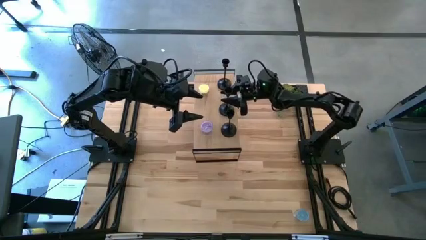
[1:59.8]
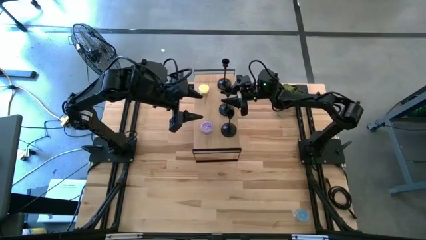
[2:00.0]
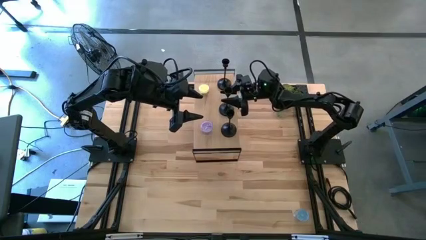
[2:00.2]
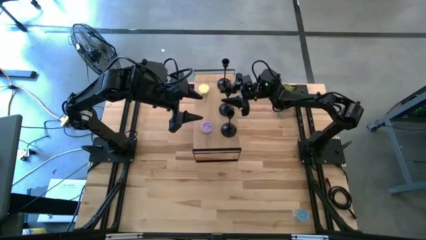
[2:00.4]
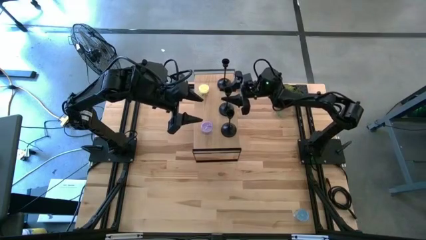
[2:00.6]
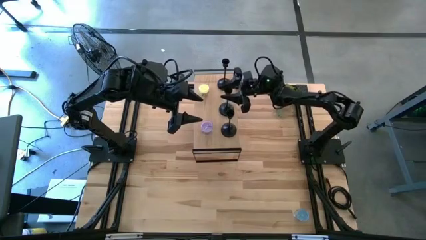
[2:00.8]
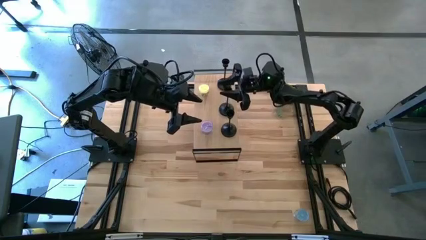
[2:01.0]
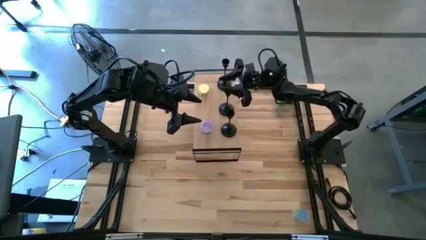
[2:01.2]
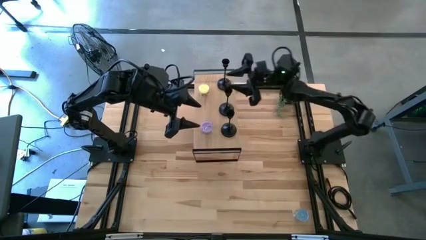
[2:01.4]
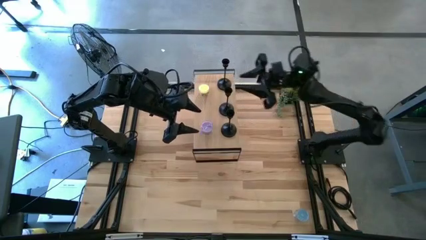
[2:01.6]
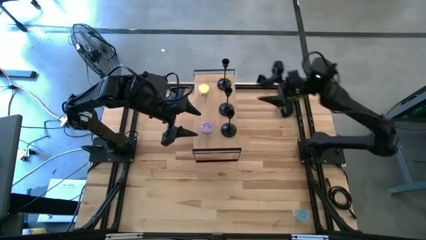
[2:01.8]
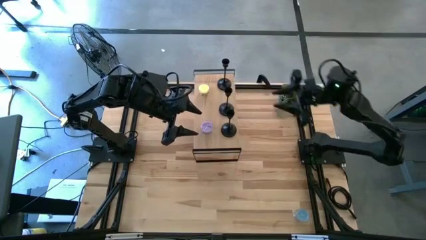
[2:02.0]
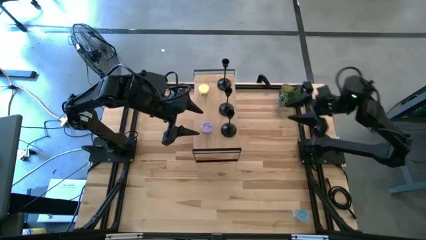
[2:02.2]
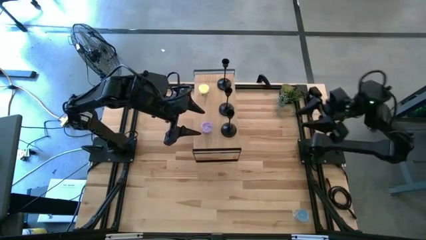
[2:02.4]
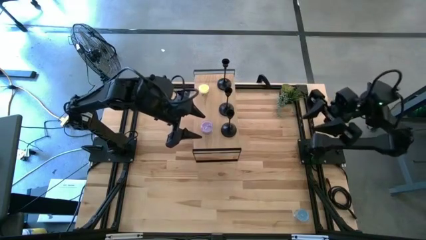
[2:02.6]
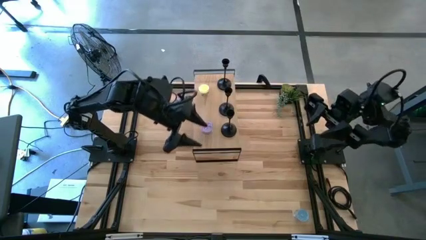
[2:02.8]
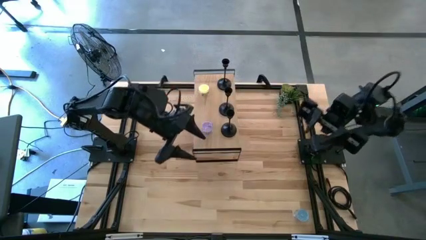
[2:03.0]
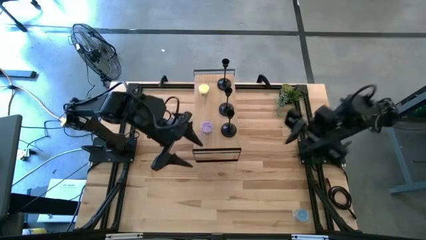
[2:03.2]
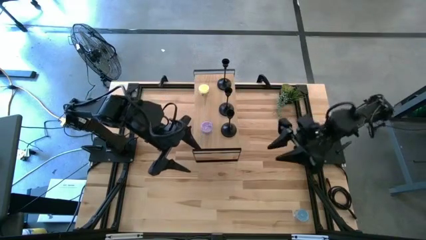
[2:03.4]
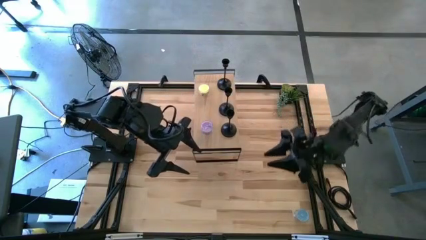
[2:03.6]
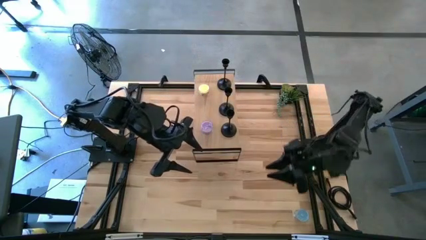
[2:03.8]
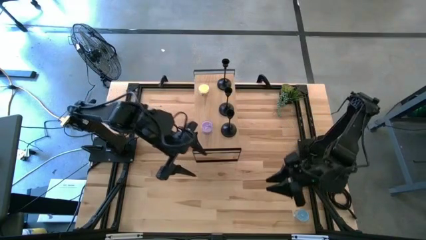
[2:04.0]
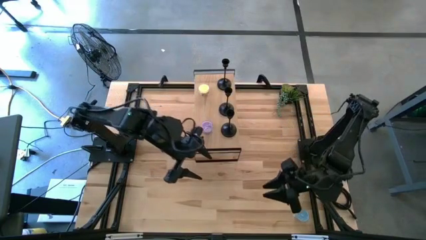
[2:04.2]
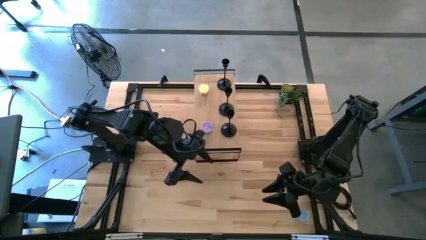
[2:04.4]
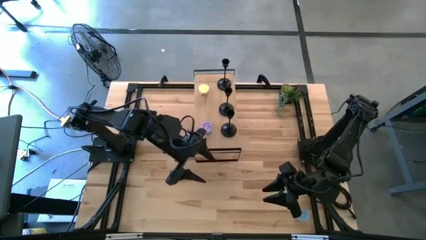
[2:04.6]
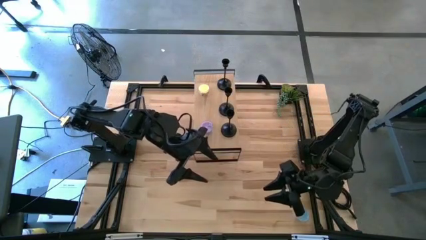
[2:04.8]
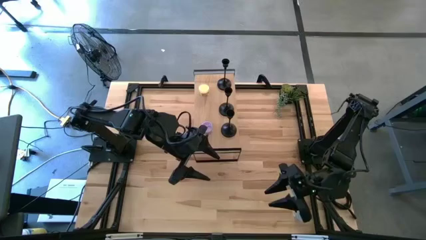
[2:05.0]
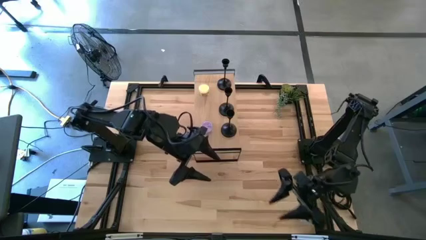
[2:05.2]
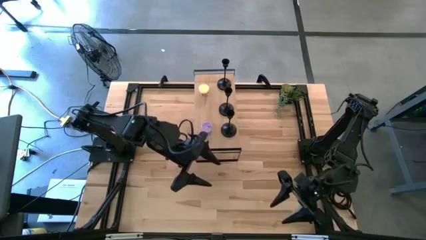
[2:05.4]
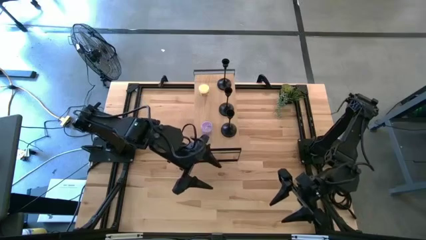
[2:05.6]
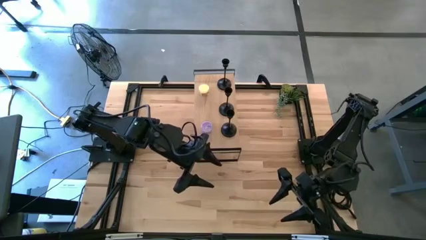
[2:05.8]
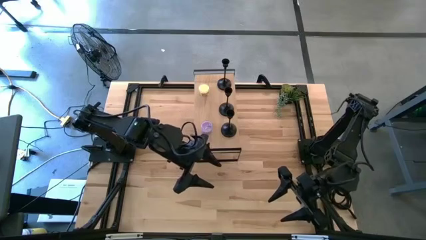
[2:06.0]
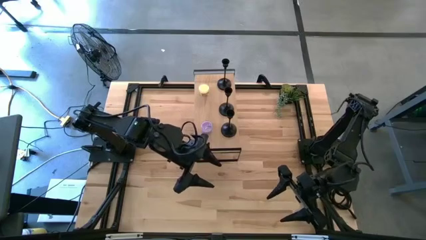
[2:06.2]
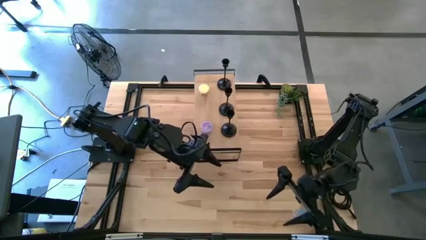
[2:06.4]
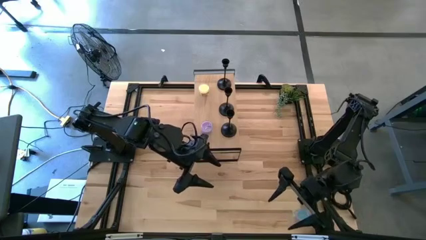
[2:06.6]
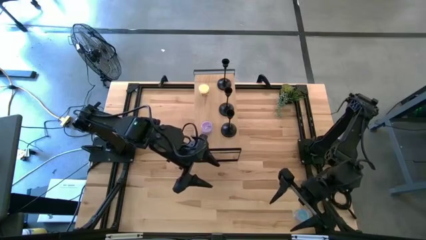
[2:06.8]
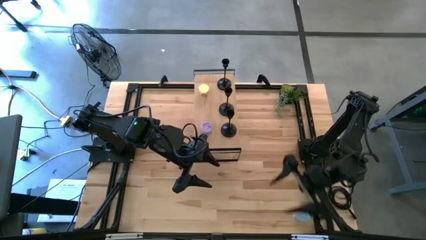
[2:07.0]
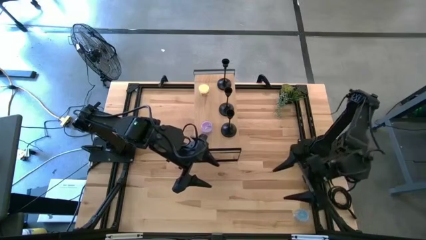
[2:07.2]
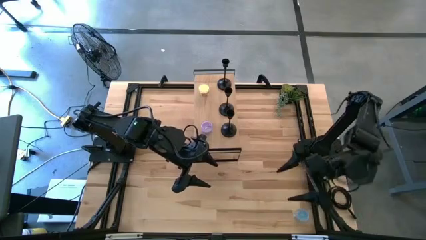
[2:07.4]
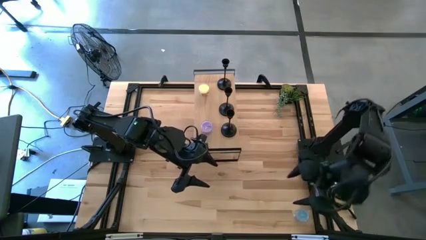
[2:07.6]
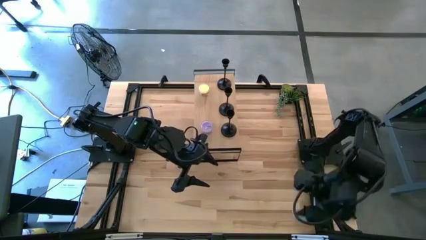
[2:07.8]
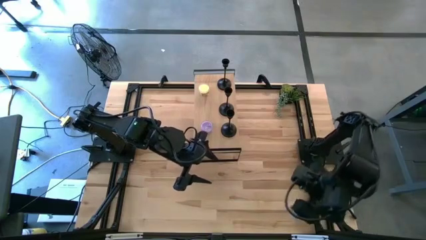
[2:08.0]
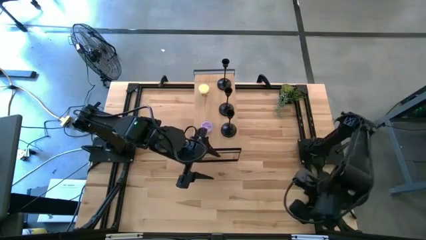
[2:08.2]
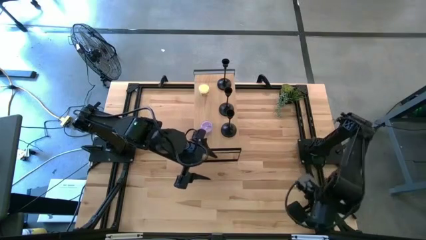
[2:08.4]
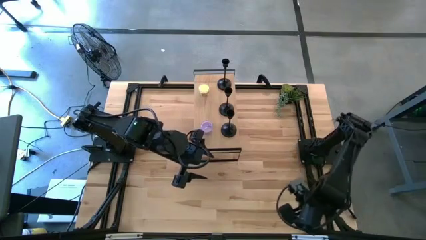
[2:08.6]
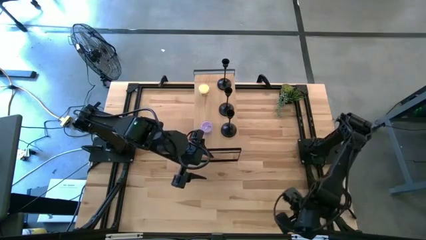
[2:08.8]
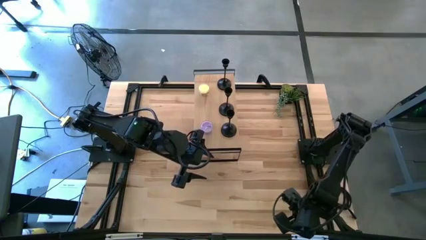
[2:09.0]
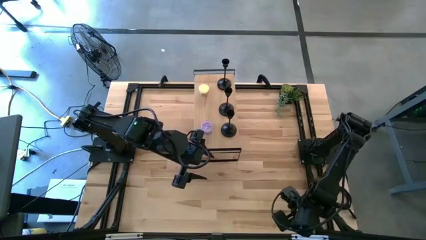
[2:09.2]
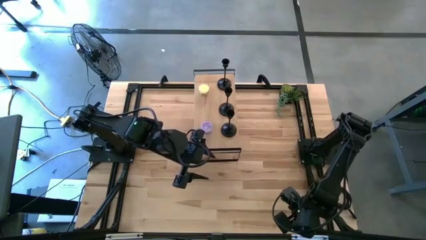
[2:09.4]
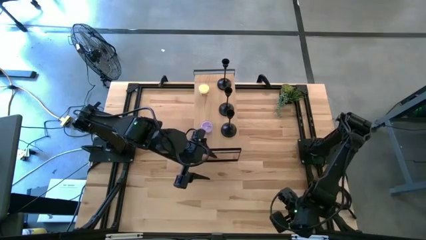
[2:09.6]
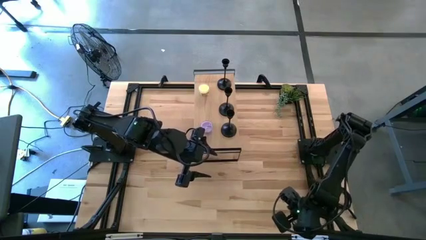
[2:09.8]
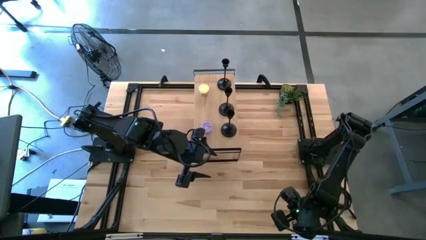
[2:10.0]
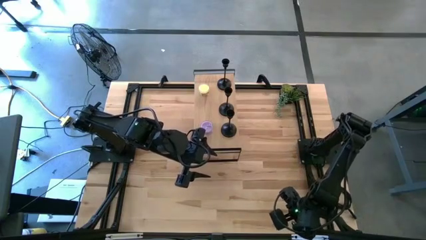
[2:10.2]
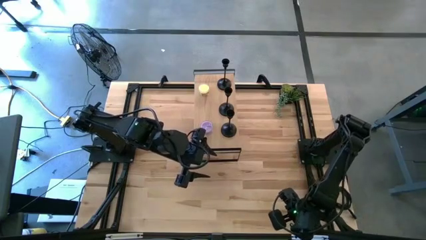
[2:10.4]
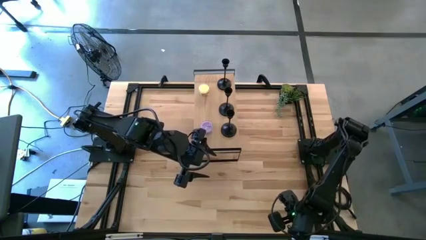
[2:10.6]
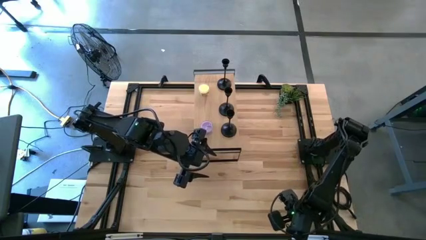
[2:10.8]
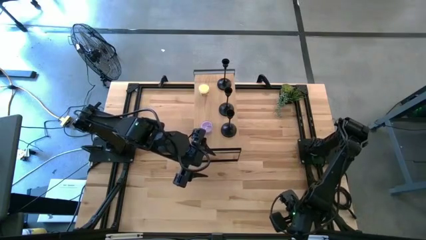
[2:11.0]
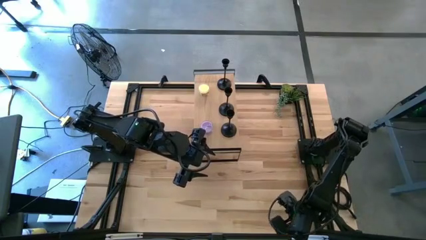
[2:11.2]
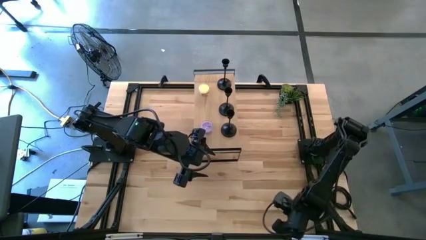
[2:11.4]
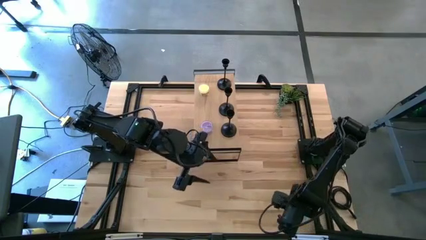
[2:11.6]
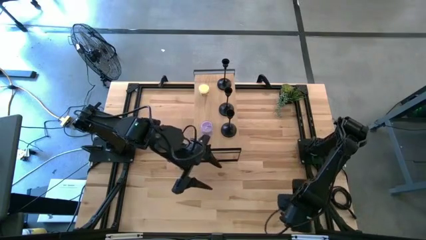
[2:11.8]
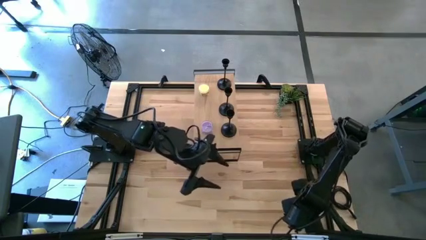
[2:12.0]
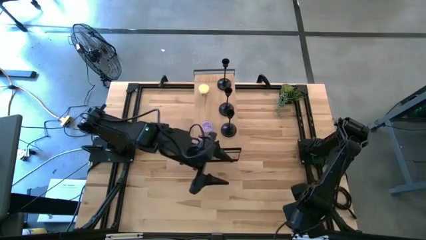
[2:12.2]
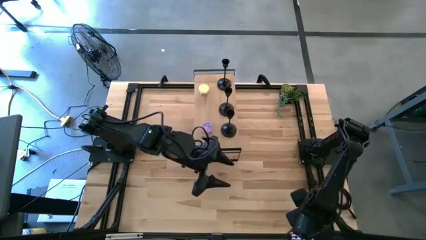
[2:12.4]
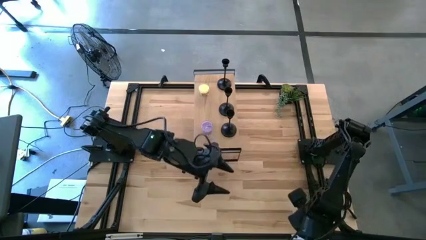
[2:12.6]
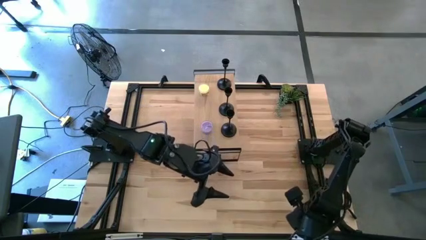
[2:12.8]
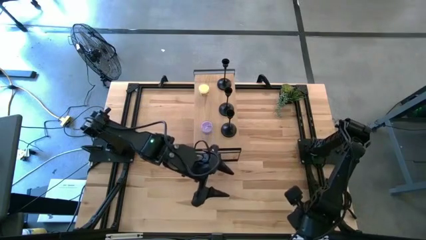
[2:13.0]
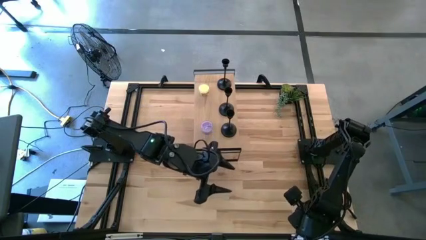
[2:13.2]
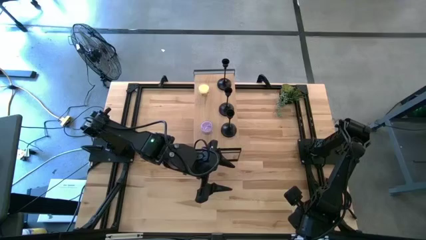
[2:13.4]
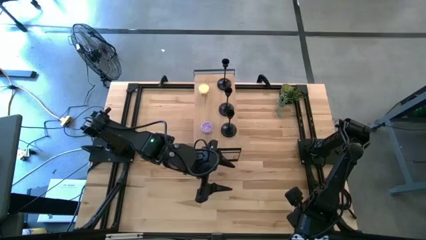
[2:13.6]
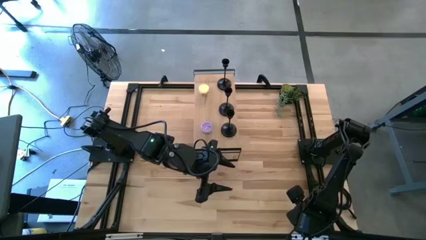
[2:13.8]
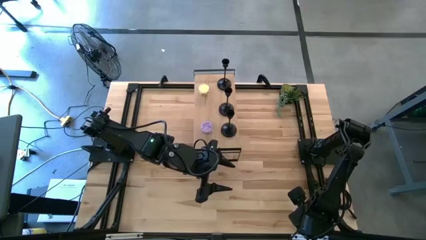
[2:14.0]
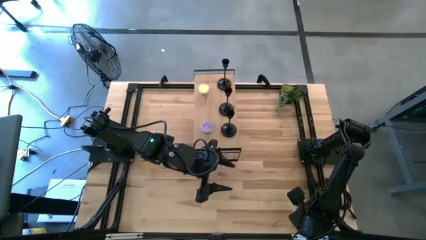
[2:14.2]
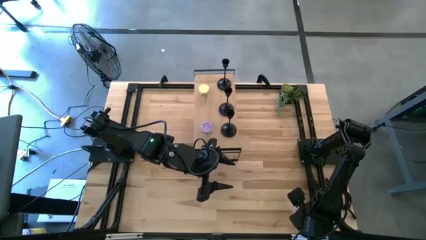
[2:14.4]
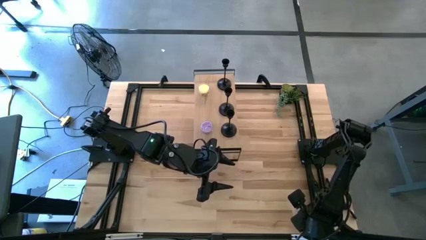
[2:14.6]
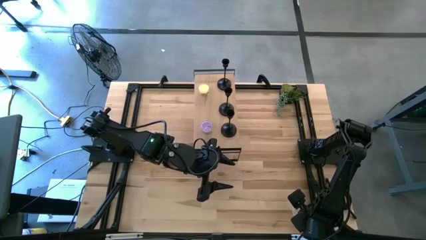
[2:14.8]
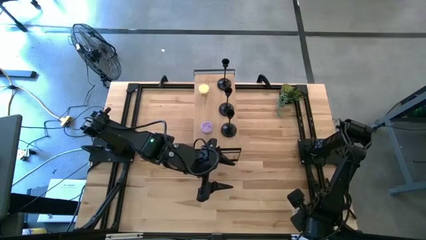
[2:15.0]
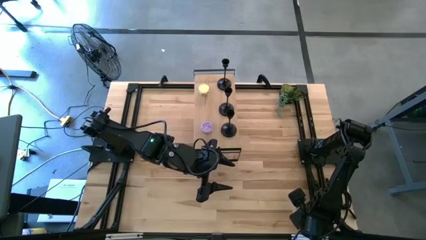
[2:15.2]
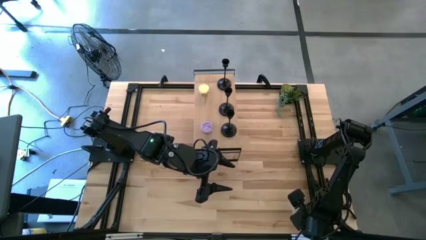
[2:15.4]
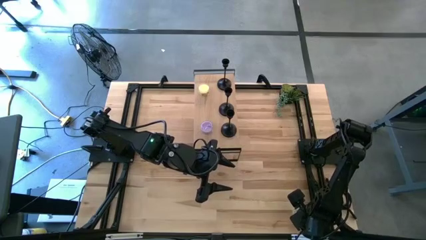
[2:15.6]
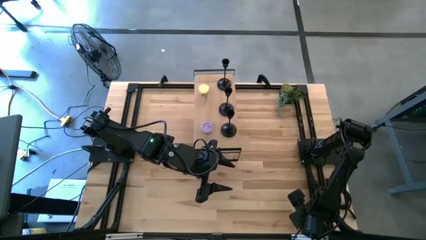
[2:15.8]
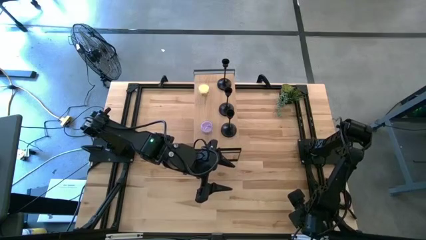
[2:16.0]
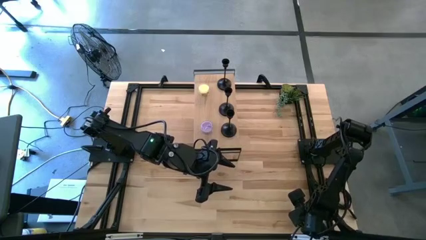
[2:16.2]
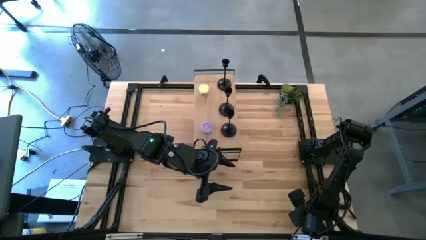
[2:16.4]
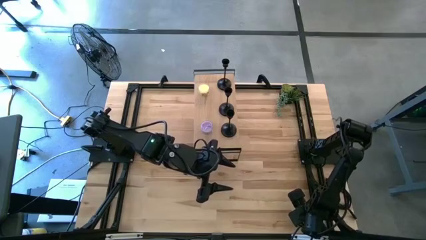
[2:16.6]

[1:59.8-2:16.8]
Task: Pick & Place candle stick holders
Put the blue scented candle on the shelf aligned with the scented candle on the shelf
